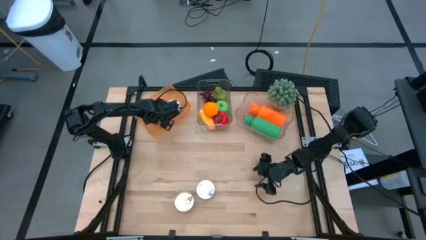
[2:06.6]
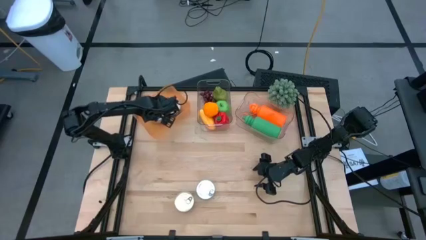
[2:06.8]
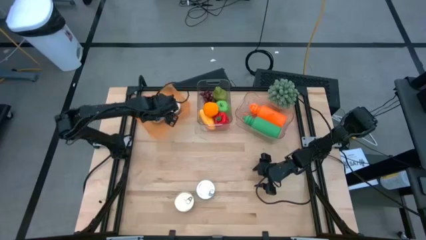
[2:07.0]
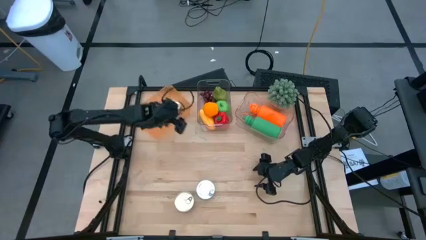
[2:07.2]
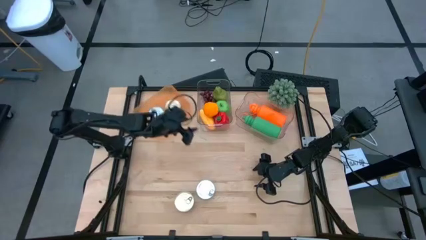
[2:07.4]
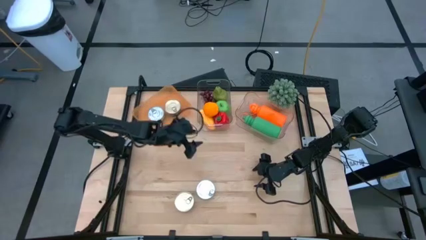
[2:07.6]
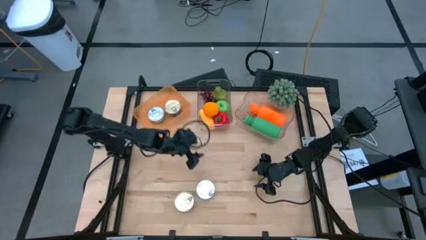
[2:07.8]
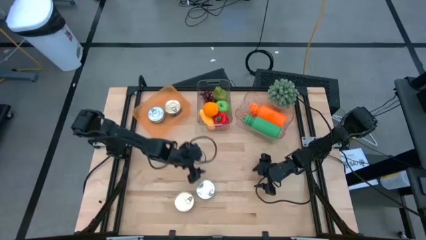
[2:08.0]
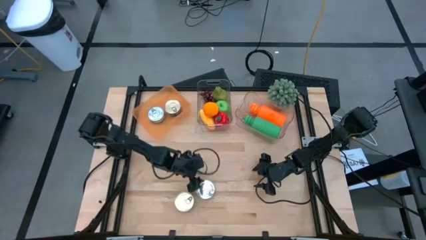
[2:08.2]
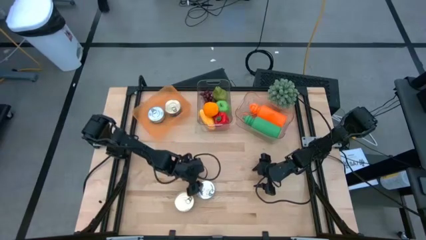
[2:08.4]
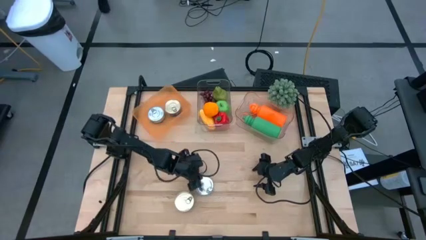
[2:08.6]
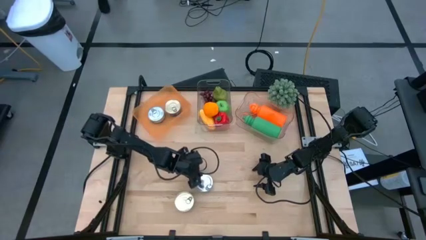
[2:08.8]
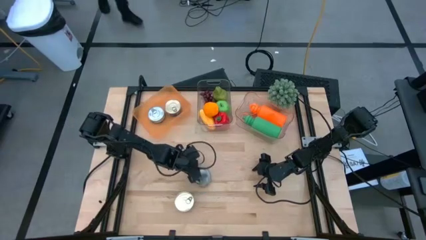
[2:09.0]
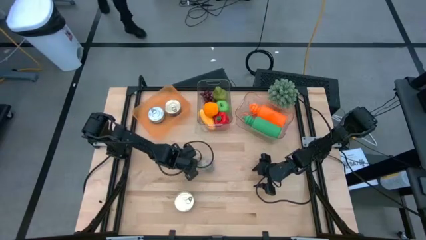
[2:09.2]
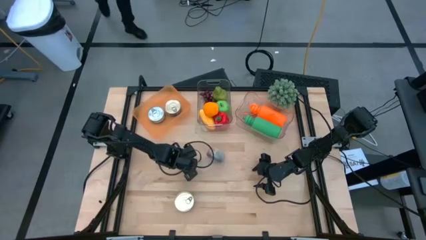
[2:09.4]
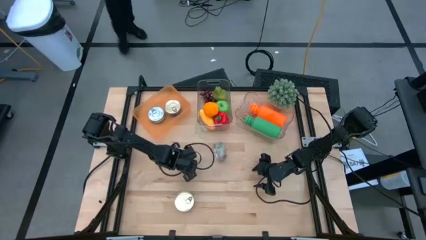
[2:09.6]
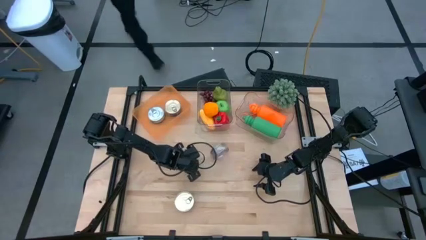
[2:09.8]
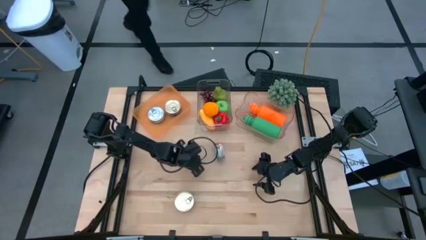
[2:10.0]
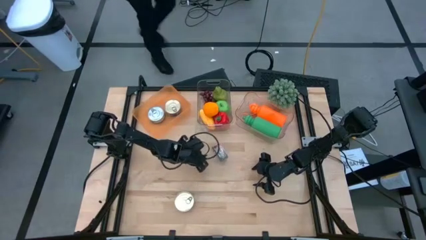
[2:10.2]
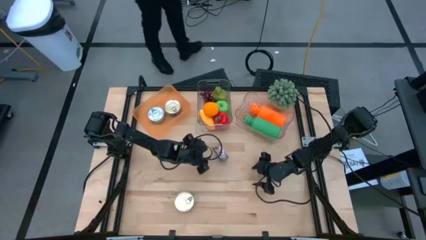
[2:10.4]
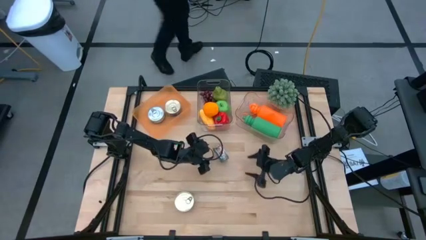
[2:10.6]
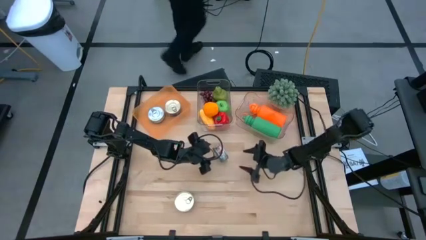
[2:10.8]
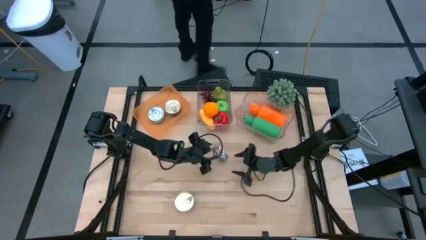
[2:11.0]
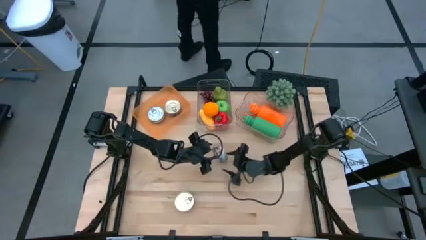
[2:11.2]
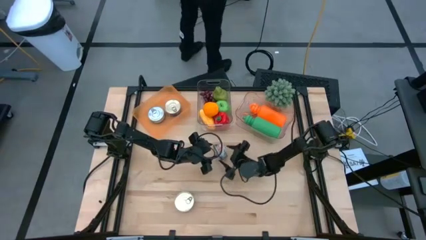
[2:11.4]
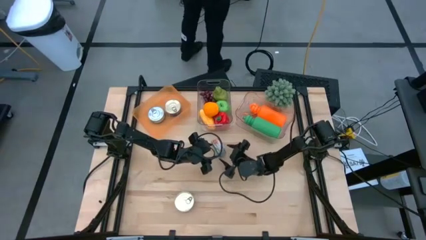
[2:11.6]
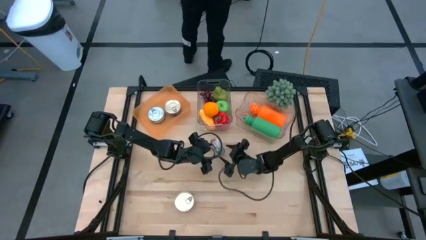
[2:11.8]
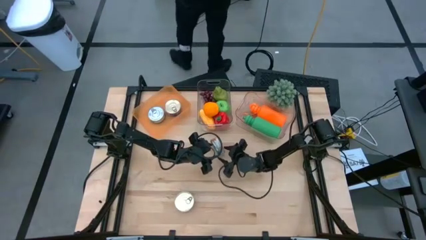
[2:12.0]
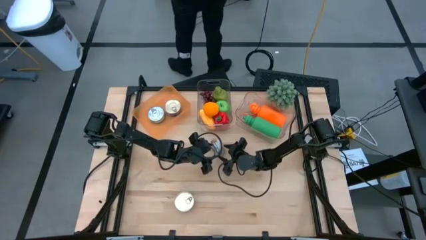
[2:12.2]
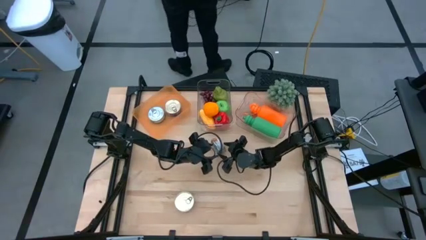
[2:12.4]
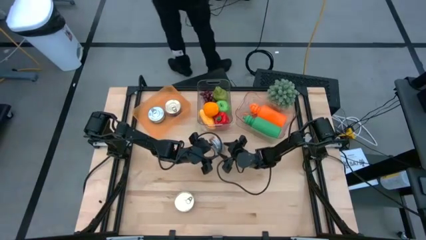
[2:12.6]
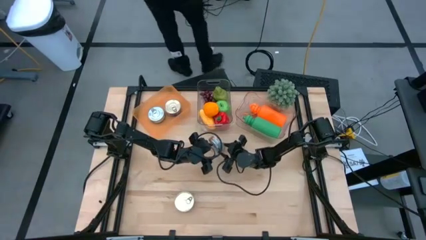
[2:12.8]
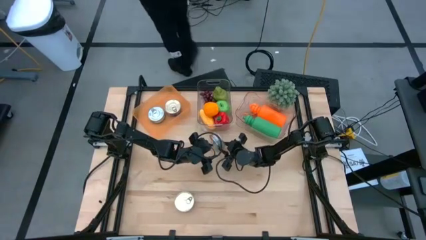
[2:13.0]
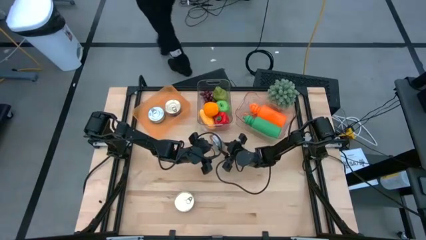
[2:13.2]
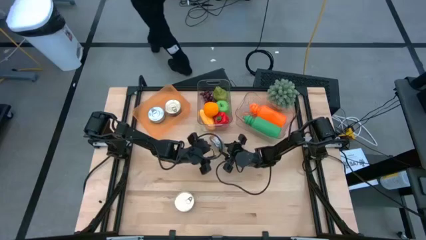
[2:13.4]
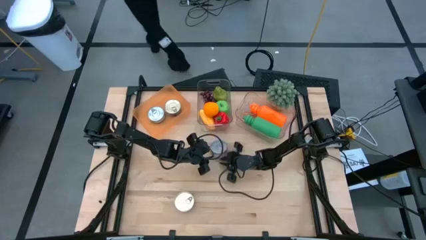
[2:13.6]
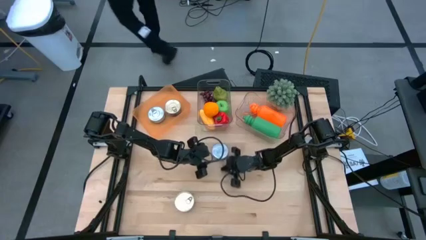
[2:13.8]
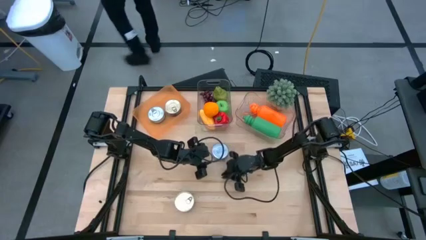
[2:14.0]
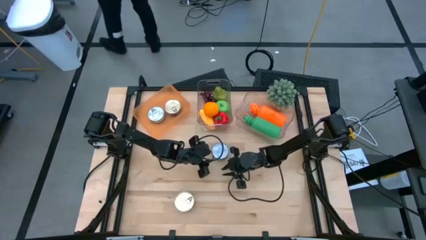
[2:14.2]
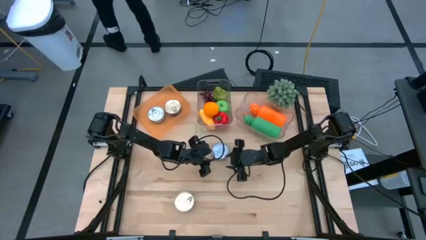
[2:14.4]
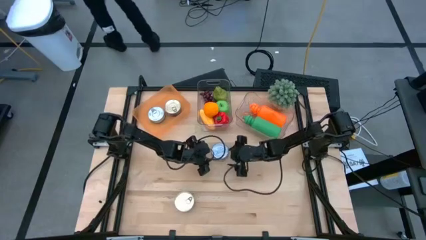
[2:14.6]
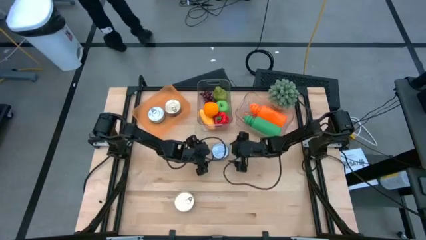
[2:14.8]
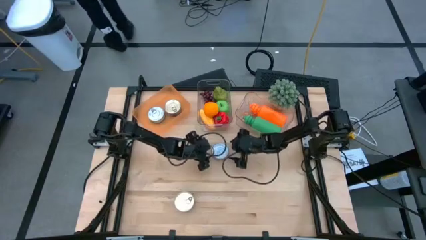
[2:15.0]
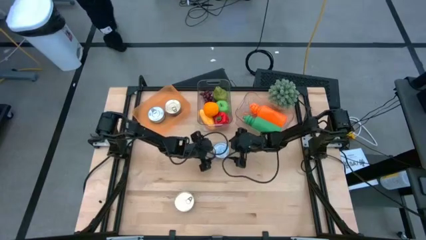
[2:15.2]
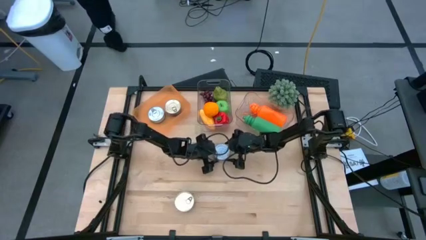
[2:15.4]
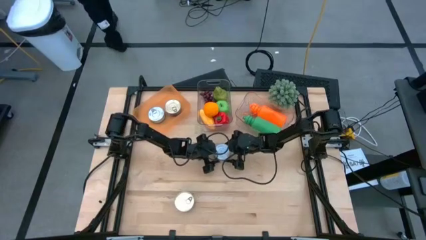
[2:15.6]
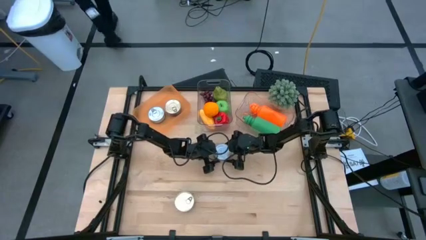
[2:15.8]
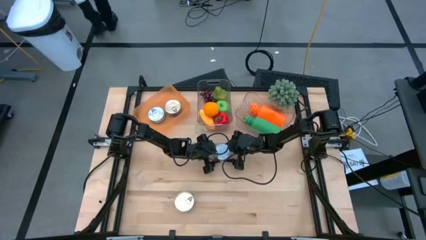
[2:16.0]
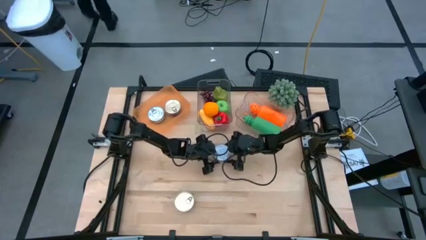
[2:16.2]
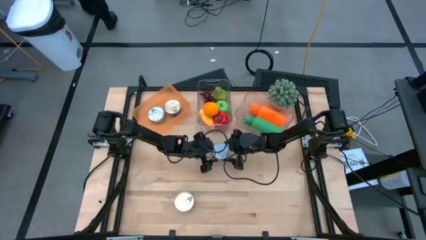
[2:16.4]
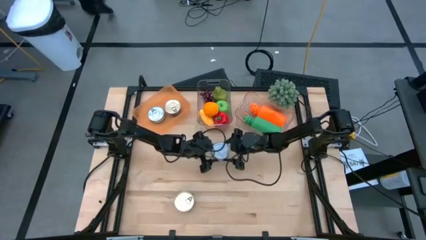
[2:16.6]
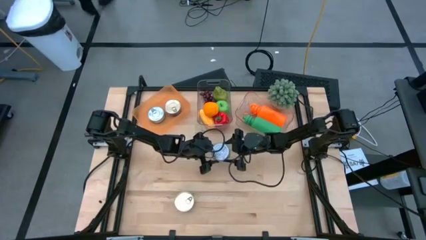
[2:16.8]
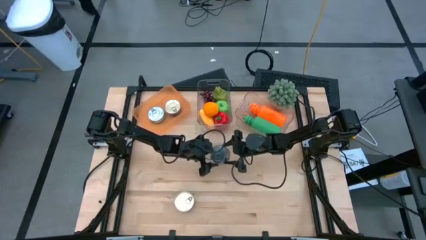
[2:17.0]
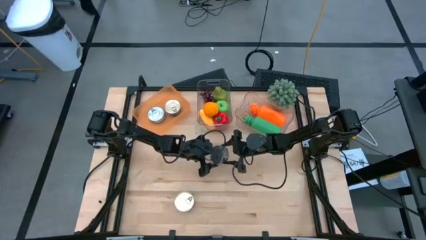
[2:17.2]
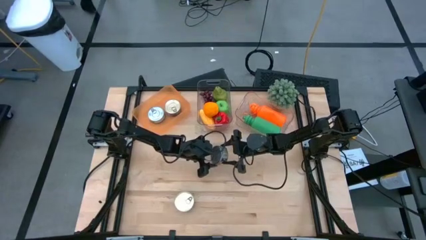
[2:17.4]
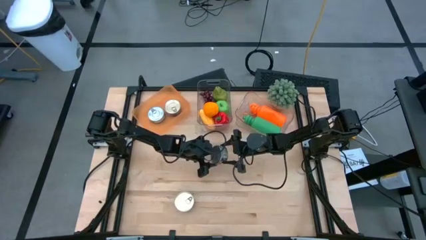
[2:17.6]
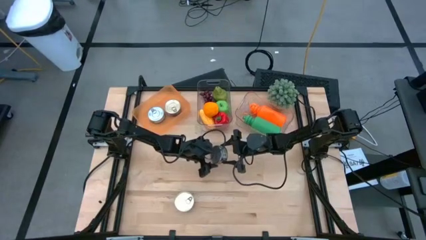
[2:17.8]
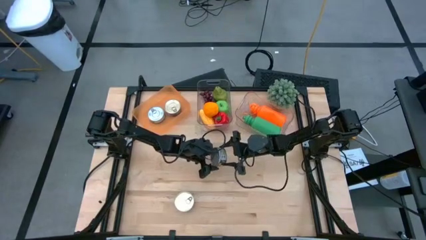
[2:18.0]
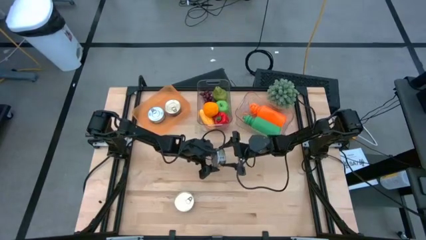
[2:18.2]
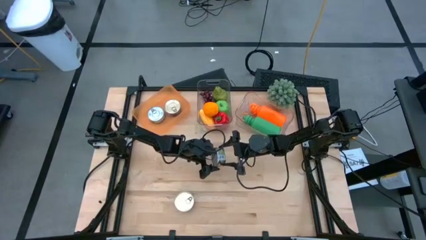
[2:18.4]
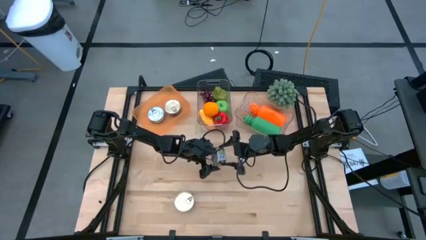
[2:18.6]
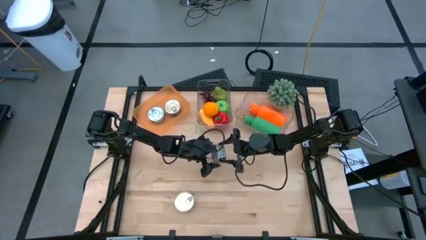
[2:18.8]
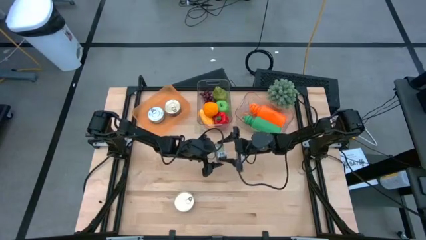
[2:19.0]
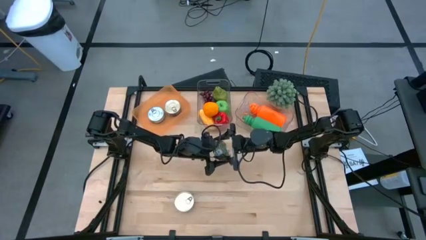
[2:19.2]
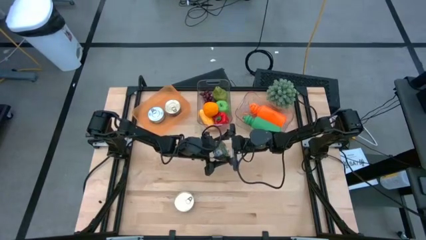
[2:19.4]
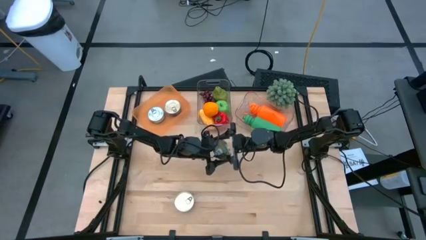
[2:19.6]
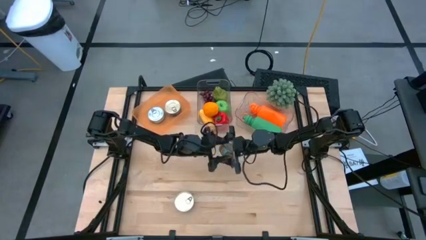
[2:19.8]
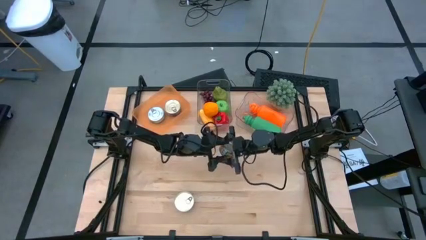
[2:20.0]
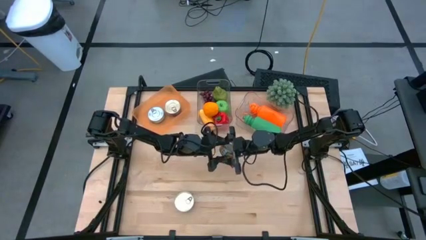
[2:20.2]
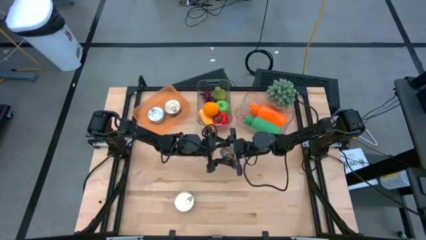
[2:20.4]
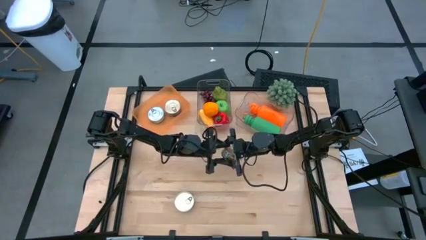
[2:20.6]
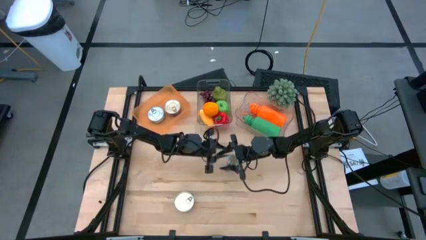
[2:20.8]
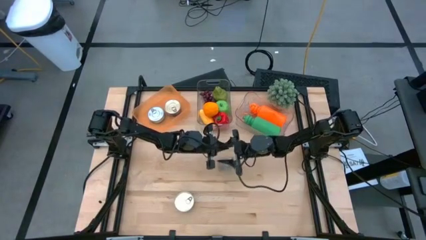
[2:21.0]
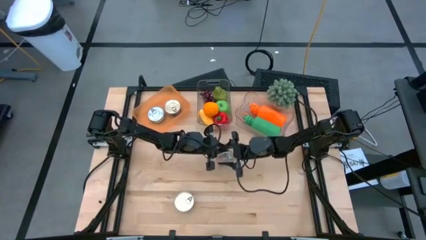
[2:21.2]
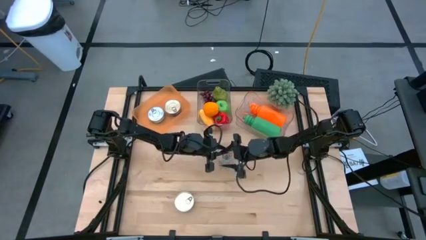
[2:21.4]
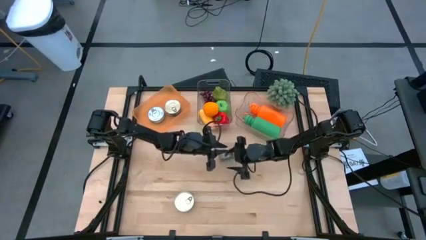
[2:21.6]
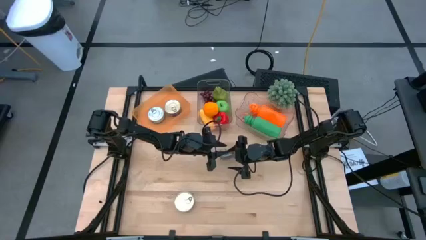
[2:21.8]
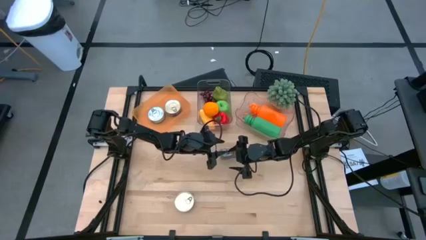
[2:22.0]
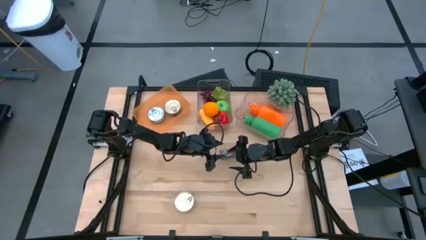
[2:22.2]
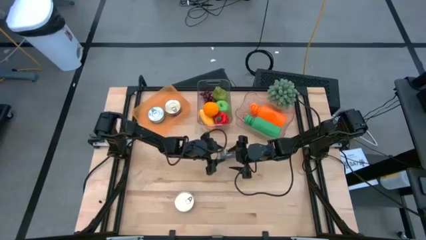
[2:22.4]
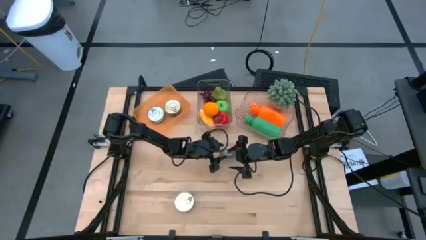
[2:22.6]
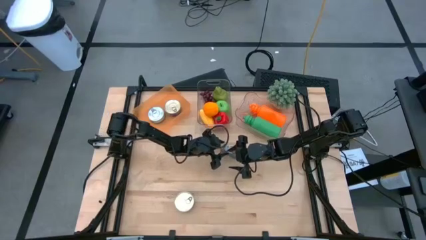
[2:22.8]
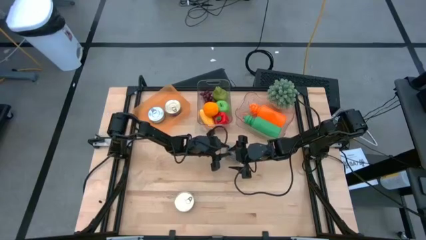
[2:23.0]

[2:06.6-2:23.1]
Task: Pick & Place Food Item
Put the green tuna can into the orange bin
